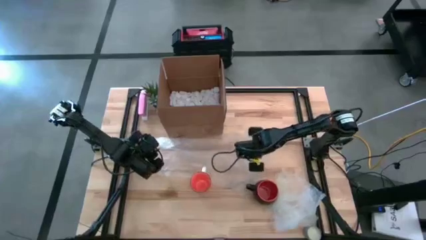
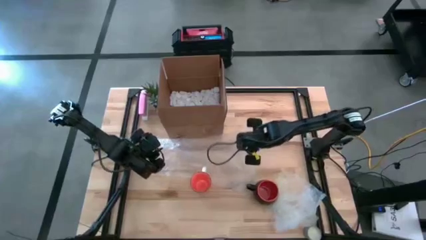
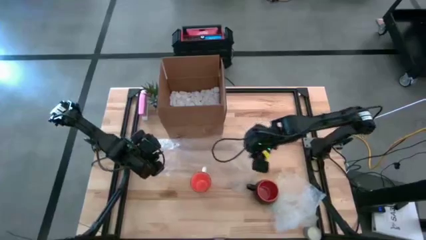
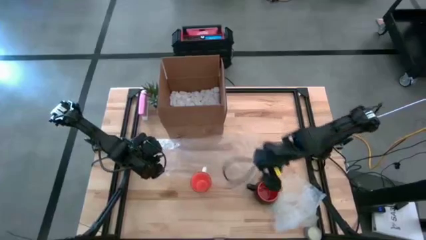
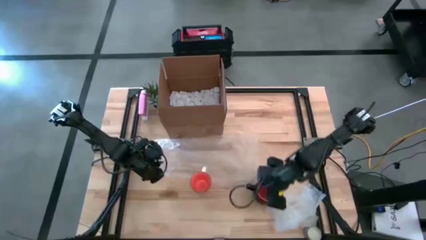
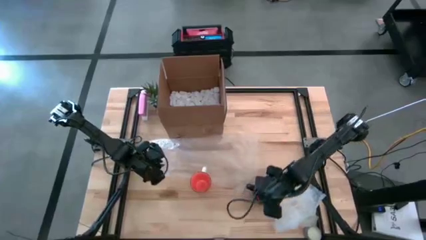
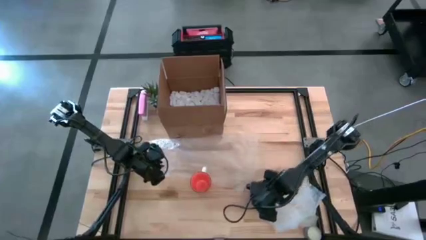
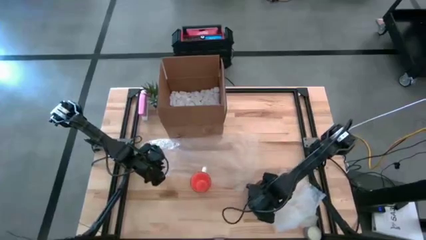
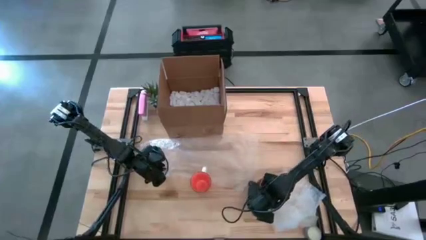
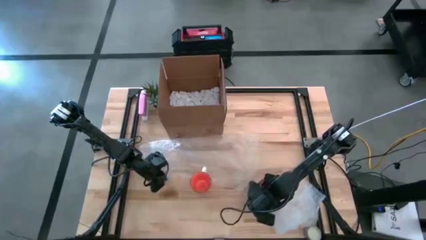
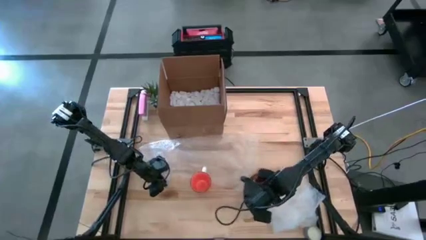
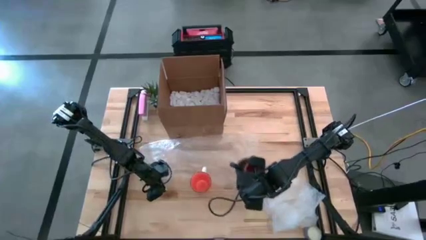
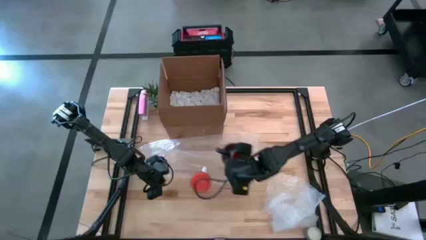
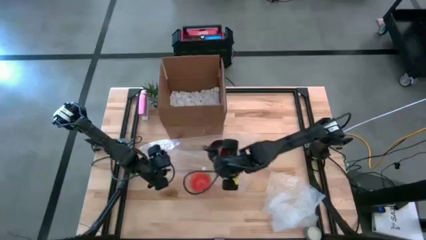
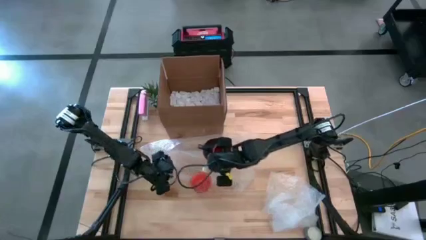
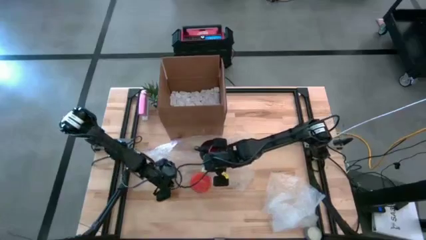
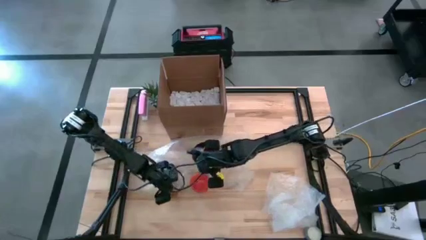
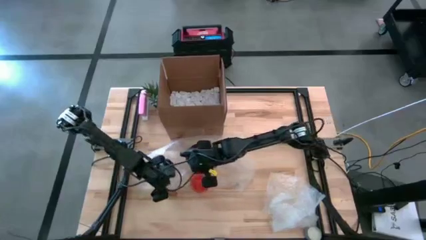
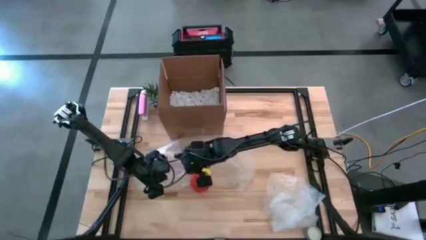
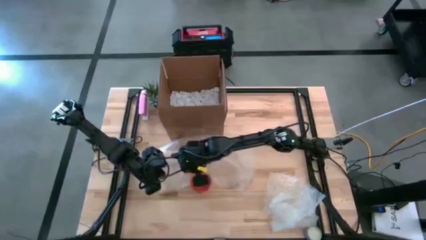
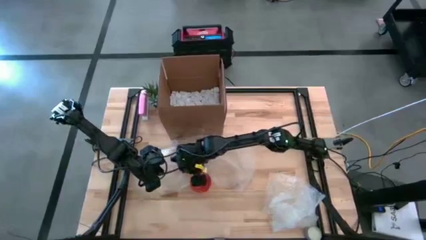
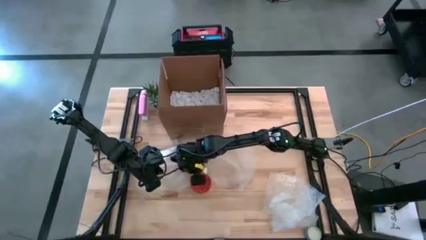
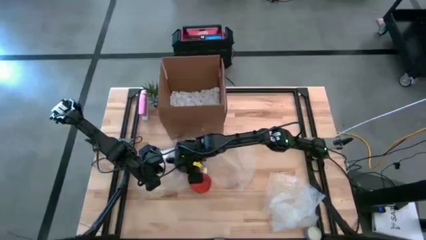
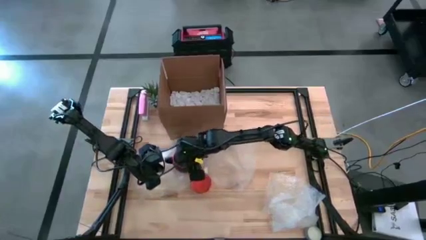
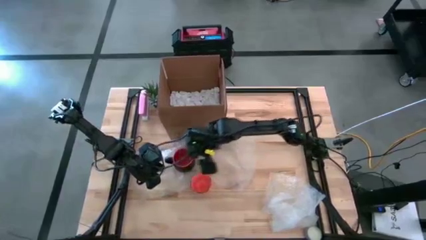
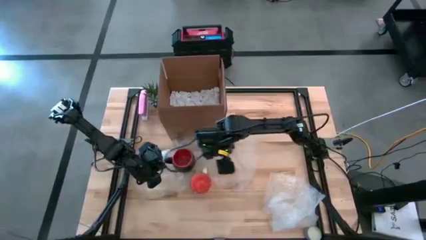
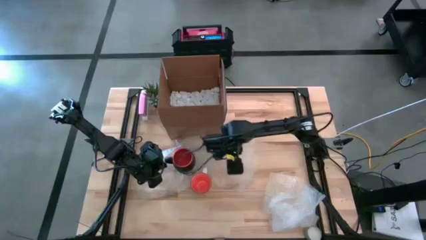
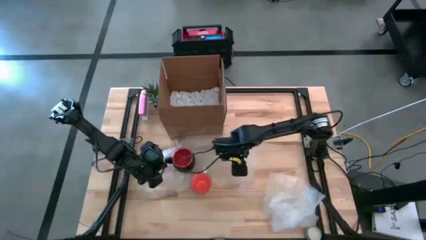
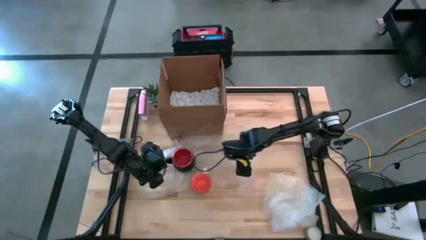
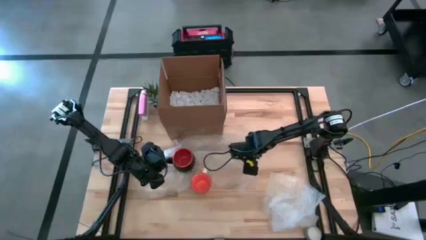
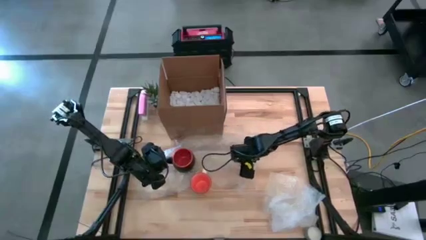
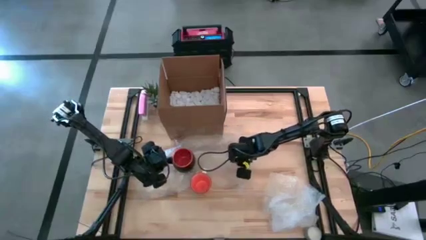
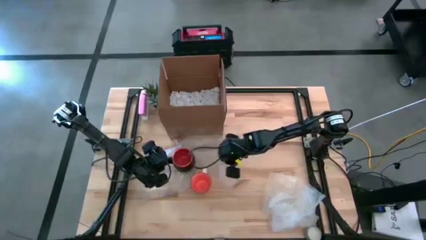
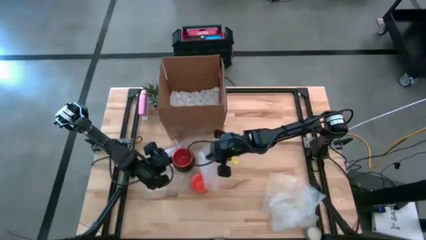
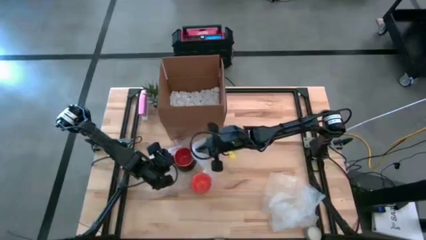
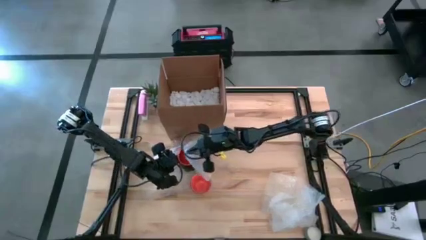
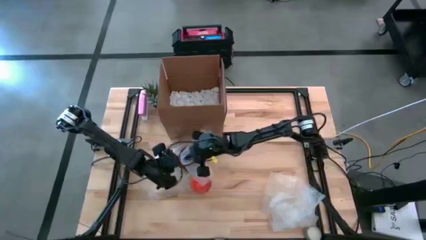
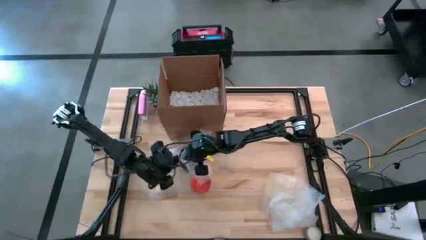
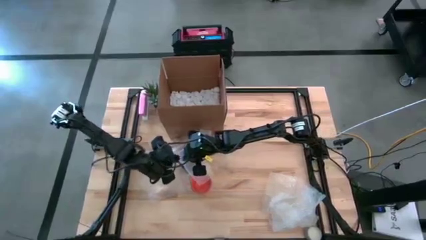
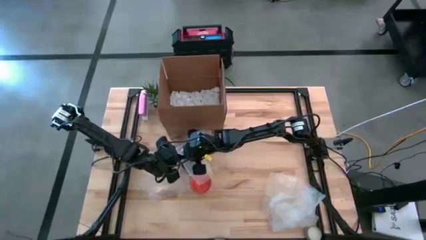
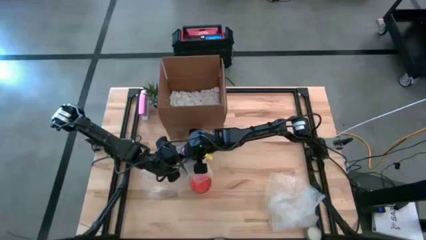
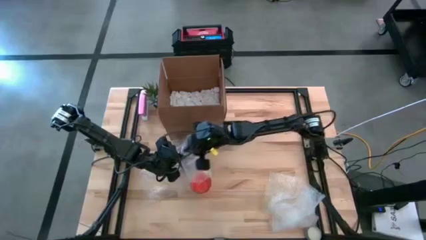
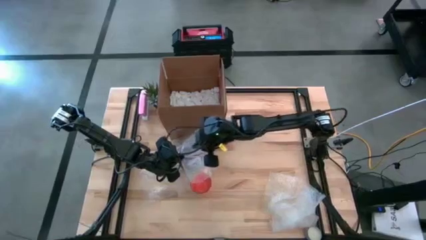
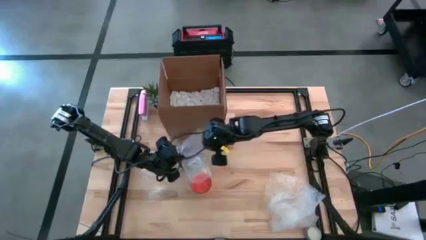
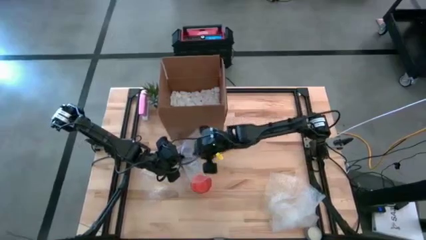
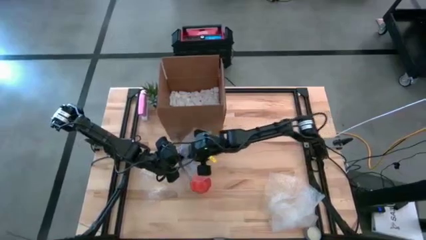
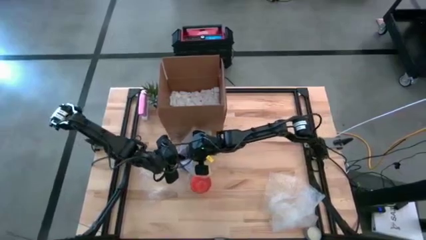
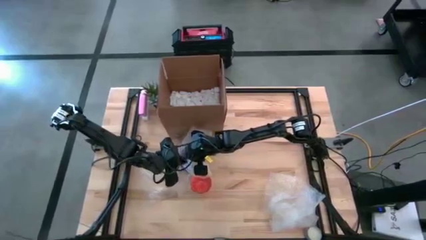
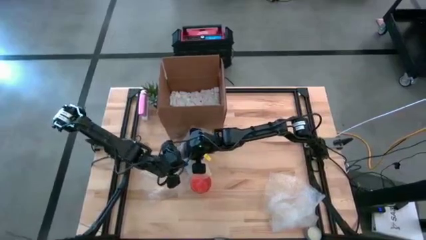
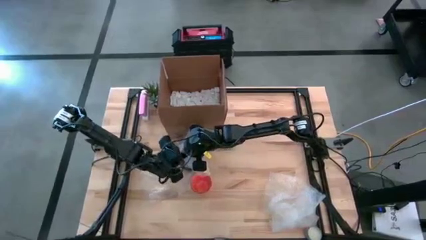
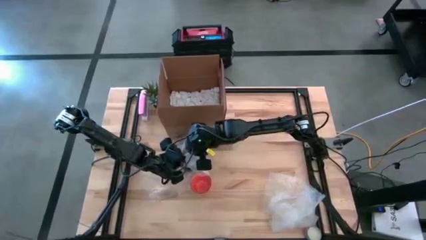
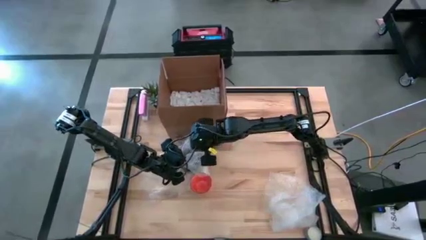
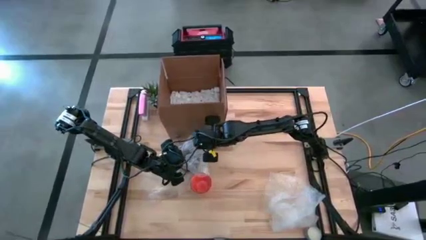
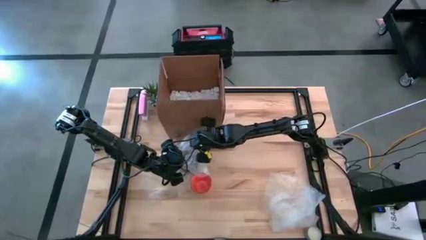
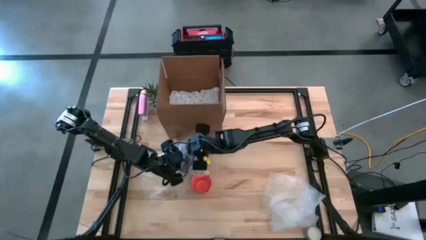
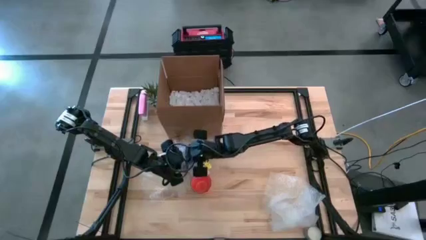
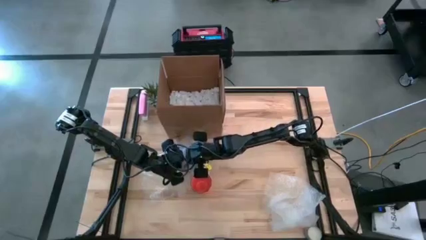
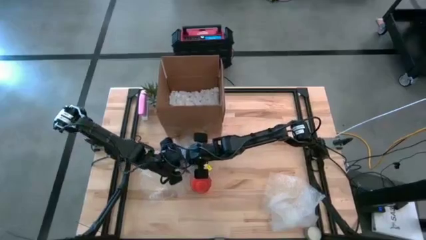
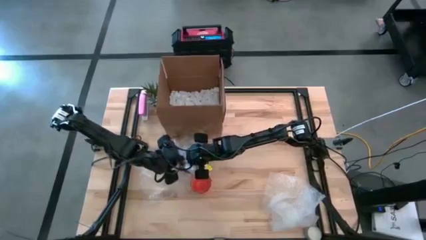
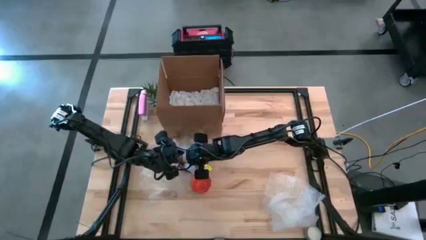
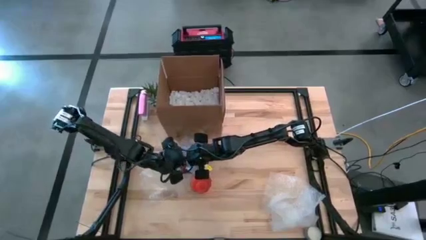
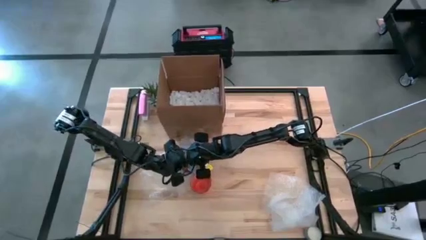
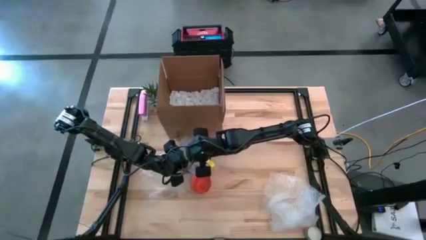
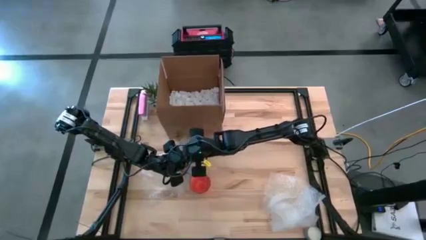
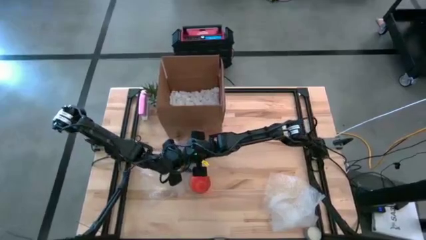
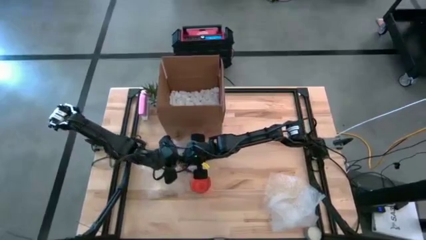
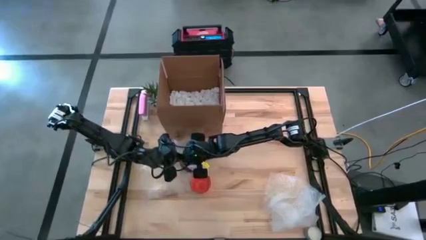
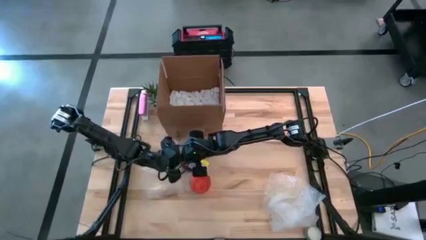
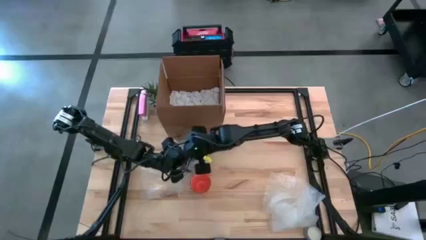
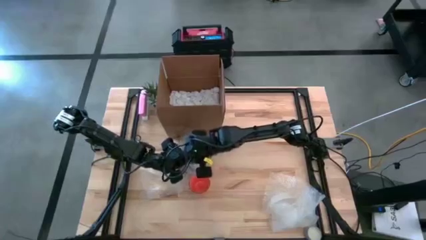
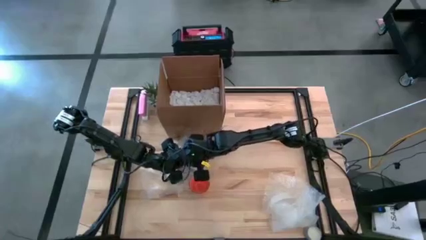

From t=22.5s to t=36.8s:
Task: wrap mug
Wrap the black mug with transparent bubble wrap

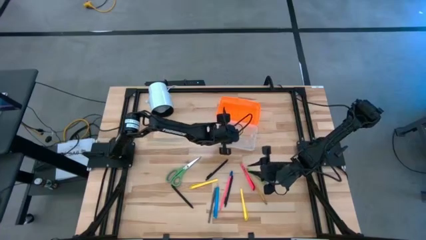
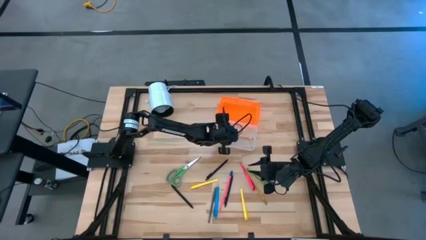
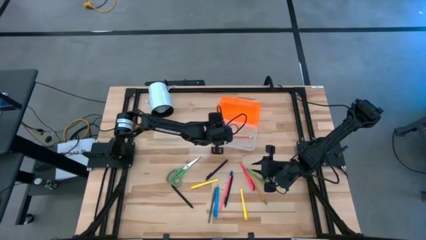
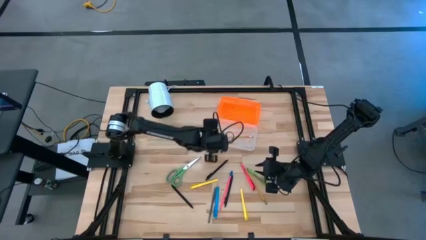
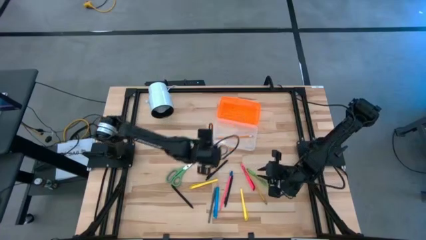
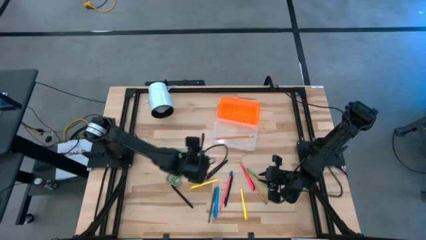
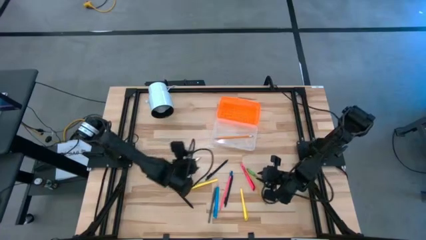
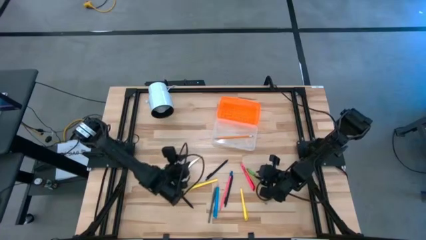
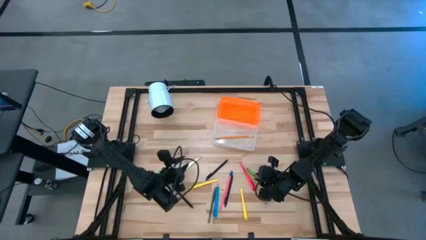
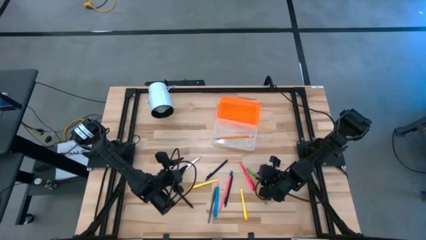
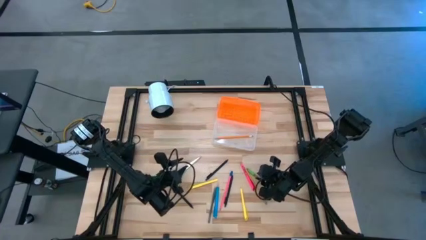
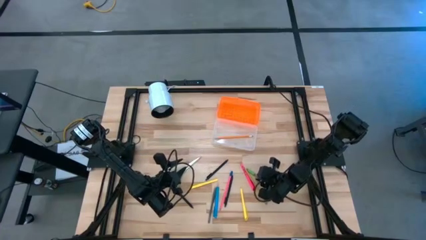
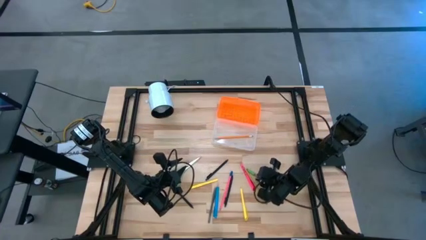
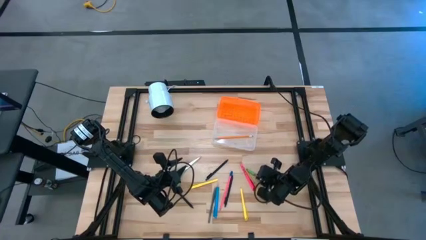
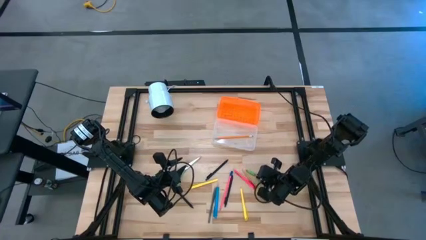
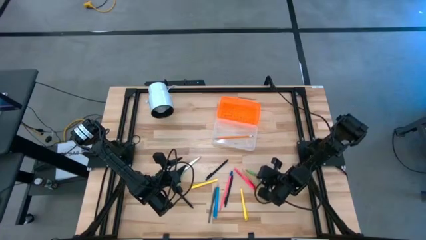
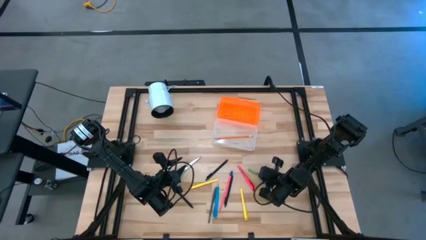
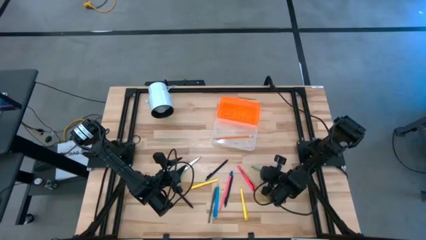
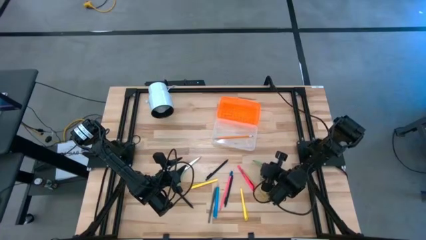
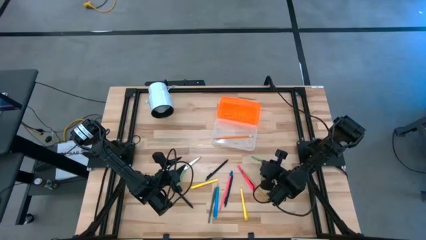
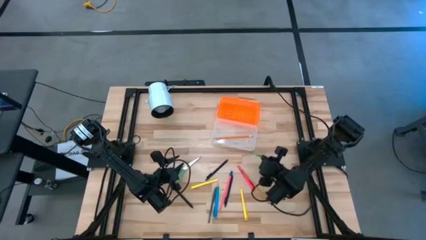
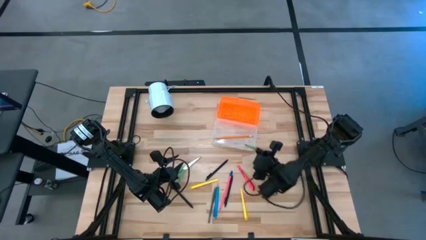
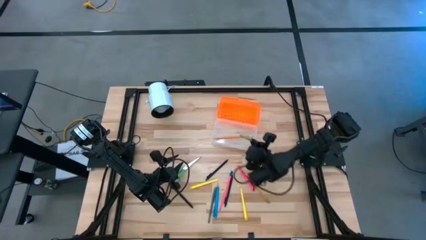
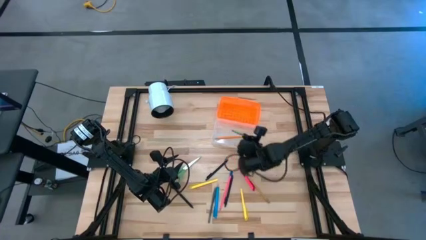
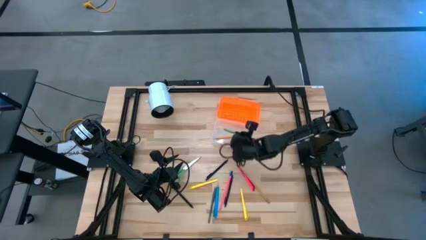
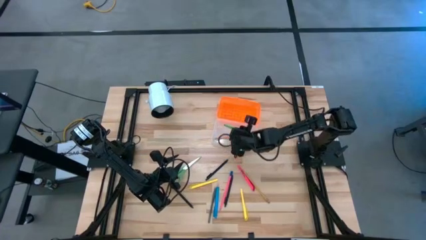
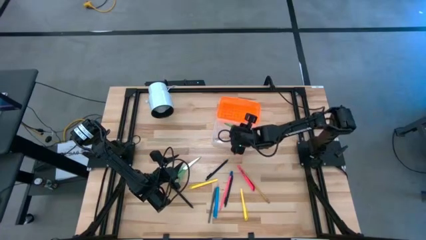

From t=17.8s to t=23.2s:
Task: Pick & place school supplies into a supply box
Put the green pen into the supply box
